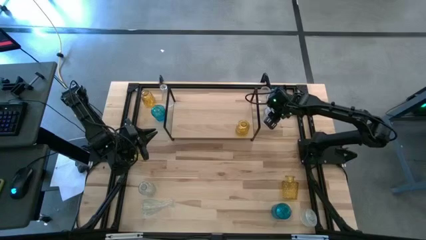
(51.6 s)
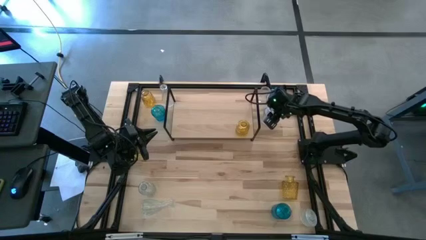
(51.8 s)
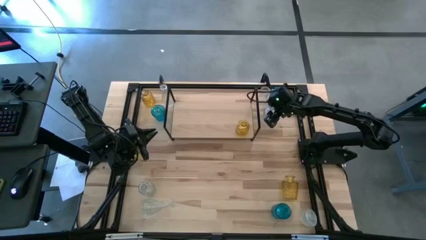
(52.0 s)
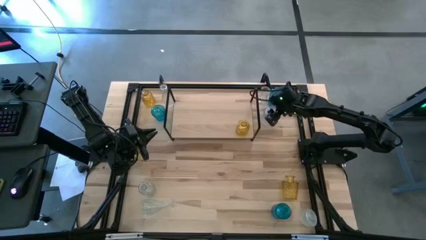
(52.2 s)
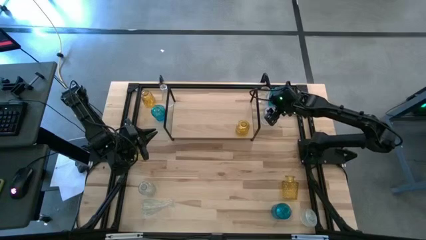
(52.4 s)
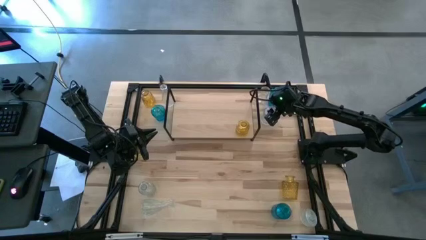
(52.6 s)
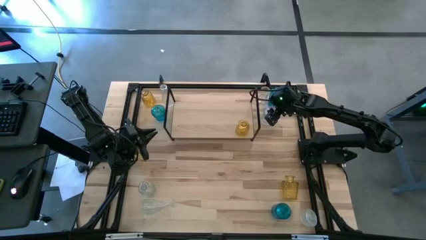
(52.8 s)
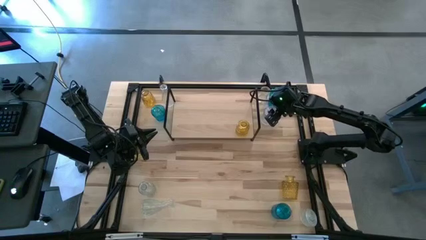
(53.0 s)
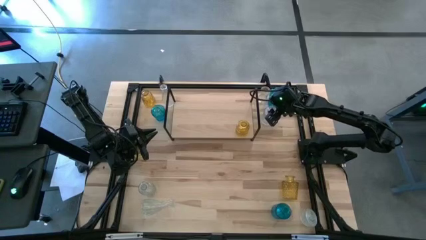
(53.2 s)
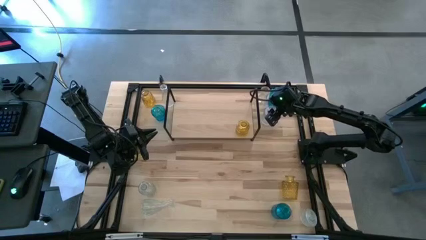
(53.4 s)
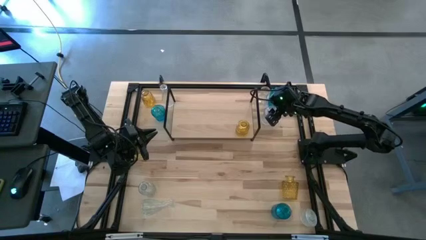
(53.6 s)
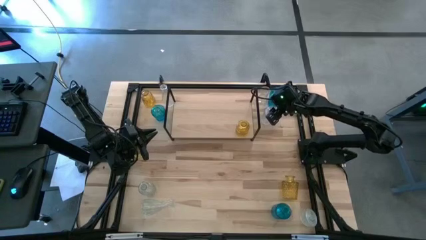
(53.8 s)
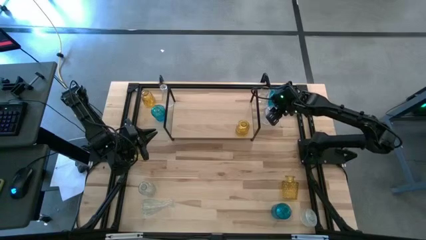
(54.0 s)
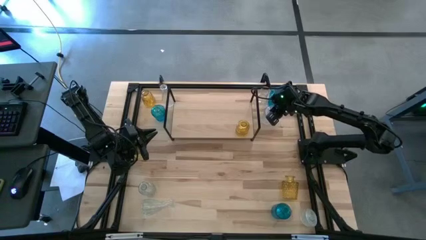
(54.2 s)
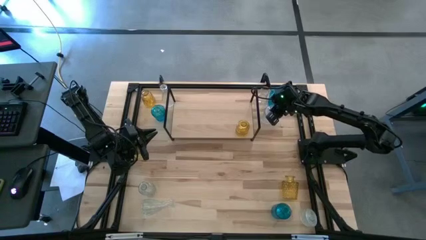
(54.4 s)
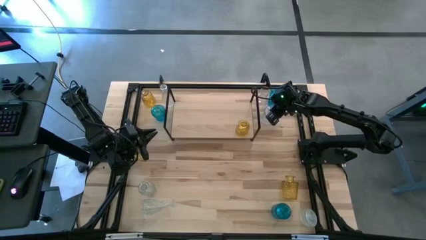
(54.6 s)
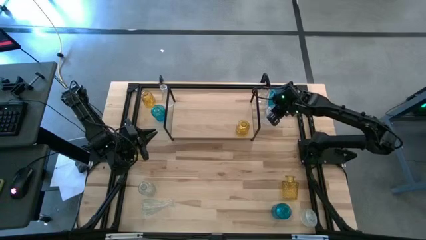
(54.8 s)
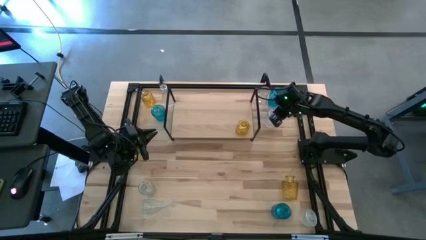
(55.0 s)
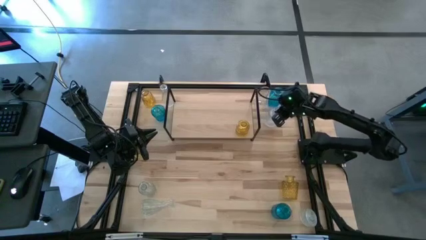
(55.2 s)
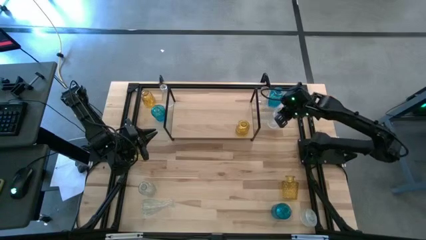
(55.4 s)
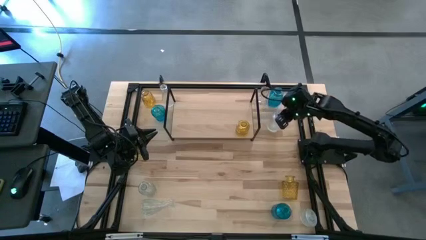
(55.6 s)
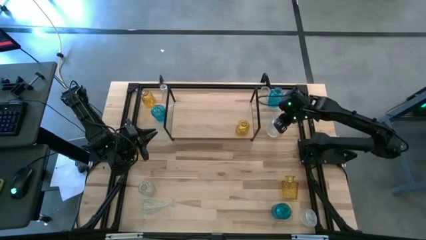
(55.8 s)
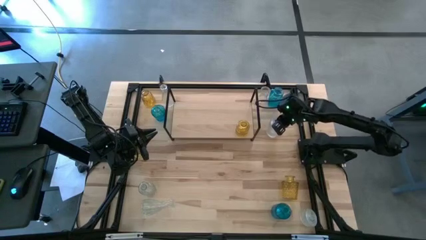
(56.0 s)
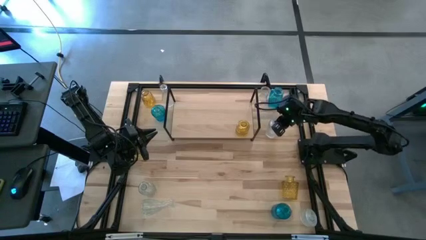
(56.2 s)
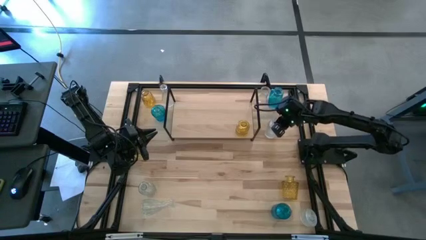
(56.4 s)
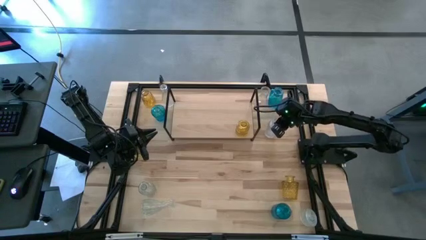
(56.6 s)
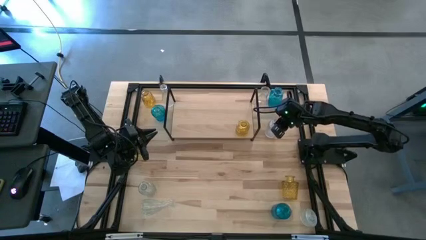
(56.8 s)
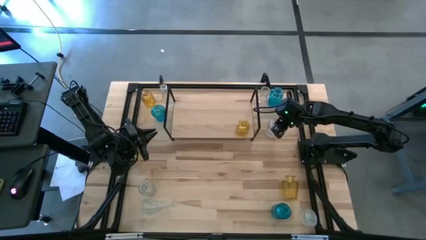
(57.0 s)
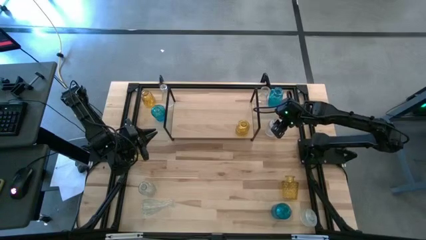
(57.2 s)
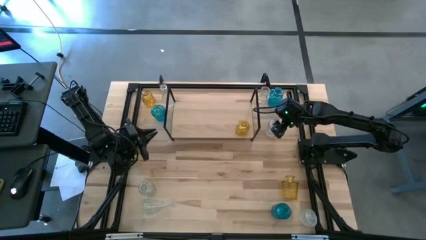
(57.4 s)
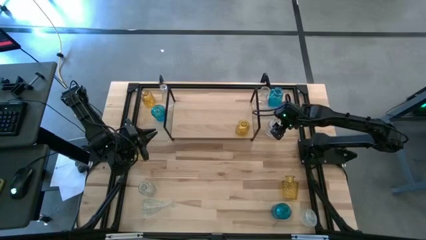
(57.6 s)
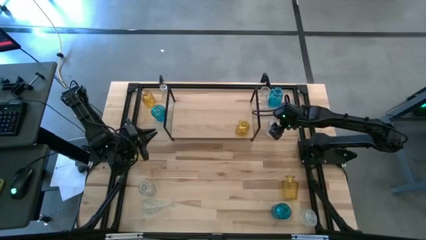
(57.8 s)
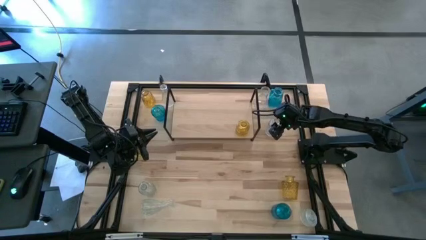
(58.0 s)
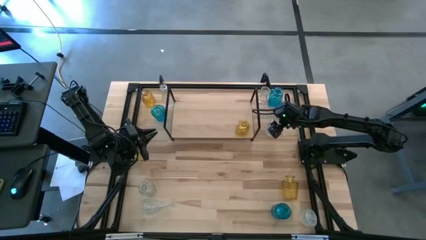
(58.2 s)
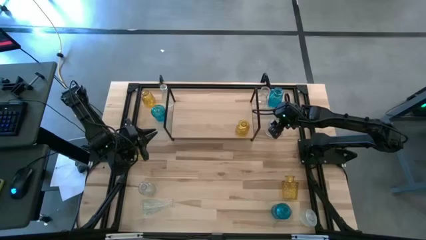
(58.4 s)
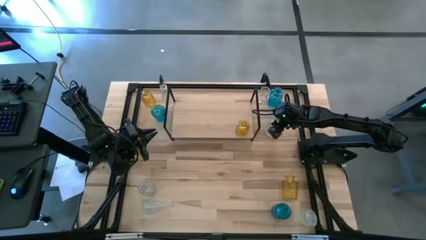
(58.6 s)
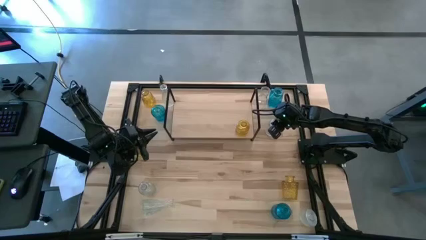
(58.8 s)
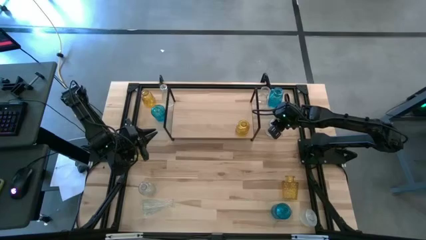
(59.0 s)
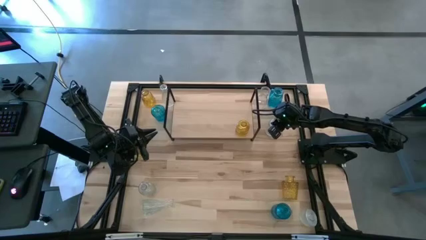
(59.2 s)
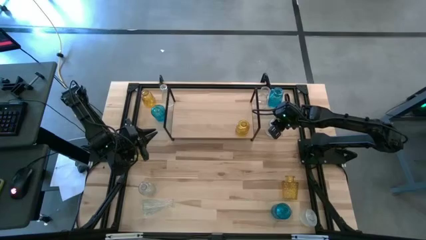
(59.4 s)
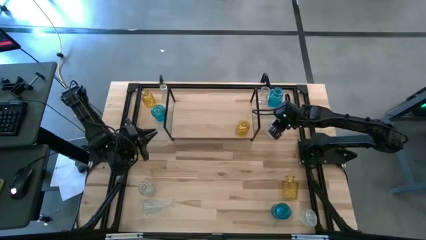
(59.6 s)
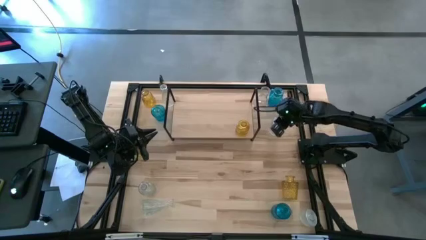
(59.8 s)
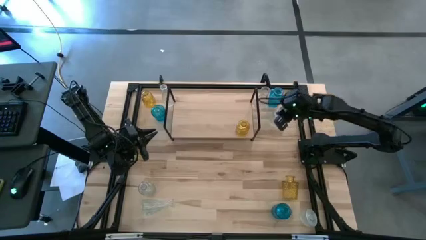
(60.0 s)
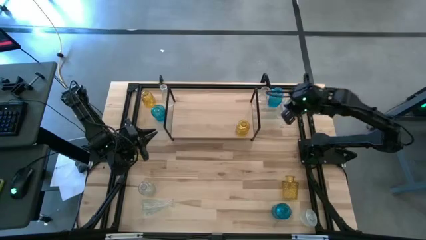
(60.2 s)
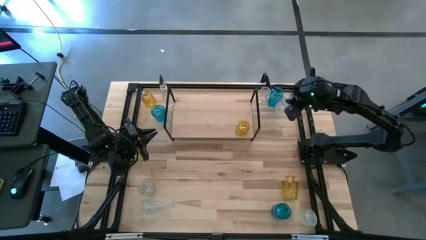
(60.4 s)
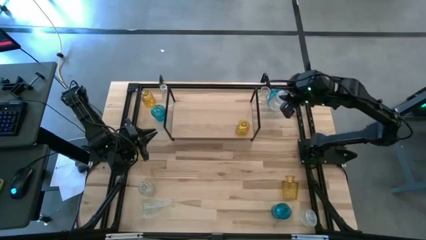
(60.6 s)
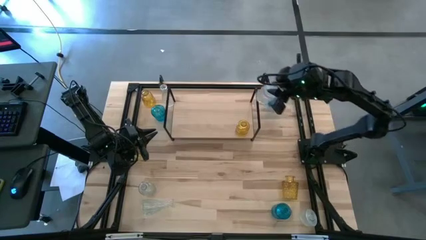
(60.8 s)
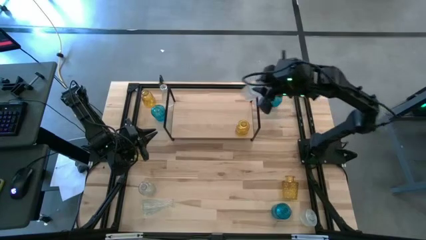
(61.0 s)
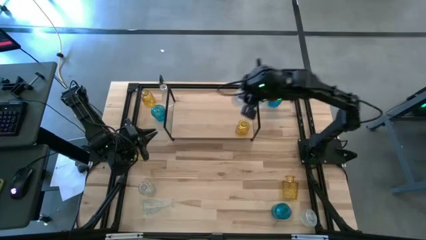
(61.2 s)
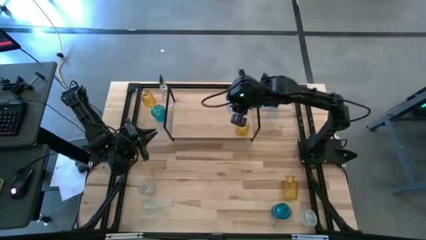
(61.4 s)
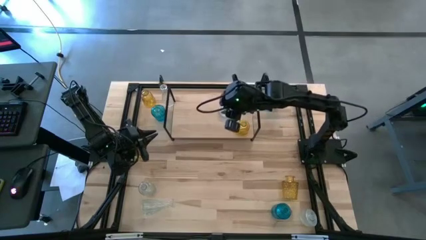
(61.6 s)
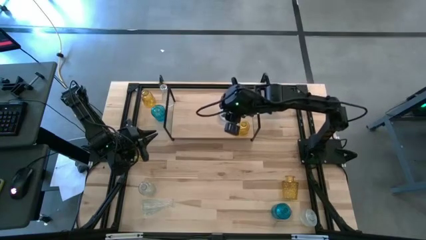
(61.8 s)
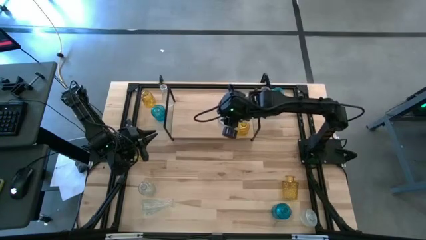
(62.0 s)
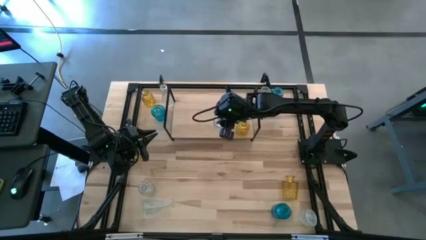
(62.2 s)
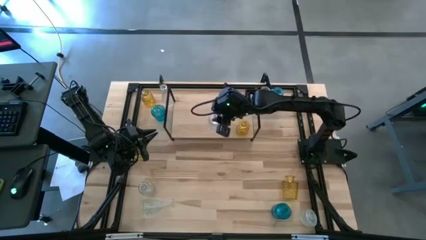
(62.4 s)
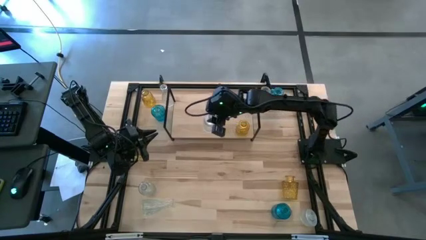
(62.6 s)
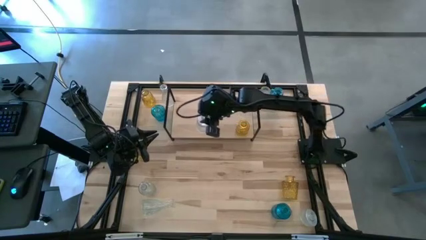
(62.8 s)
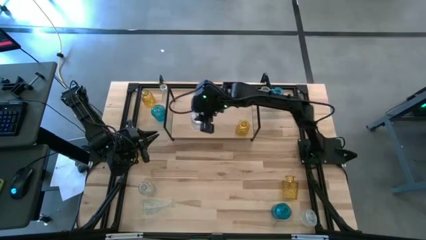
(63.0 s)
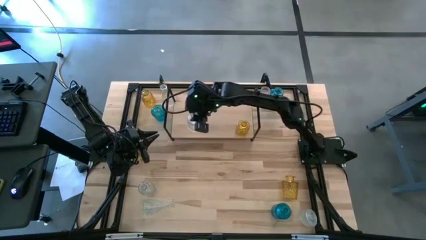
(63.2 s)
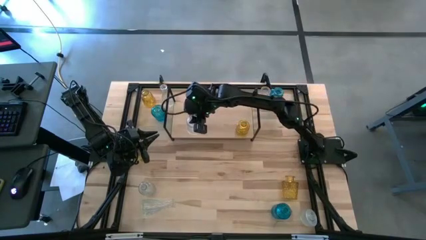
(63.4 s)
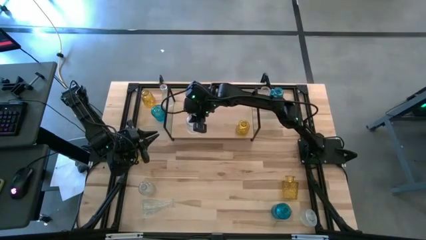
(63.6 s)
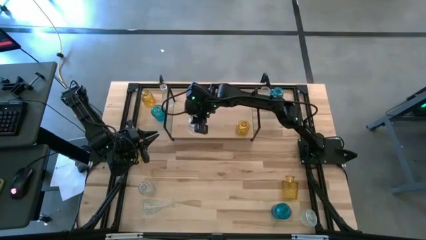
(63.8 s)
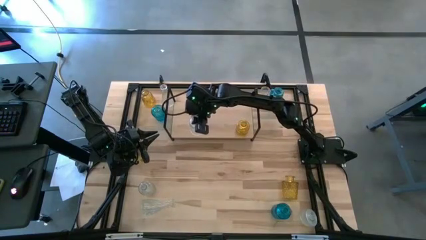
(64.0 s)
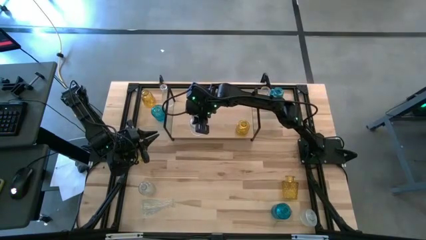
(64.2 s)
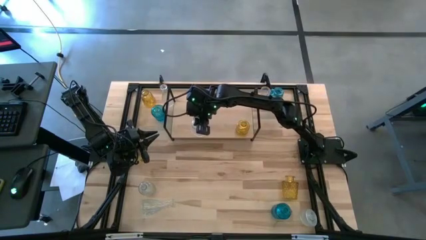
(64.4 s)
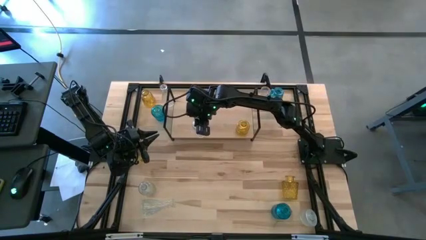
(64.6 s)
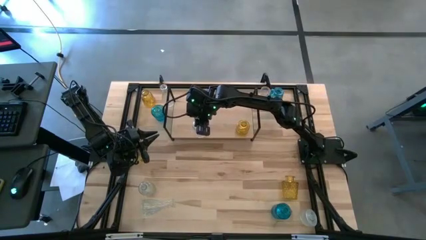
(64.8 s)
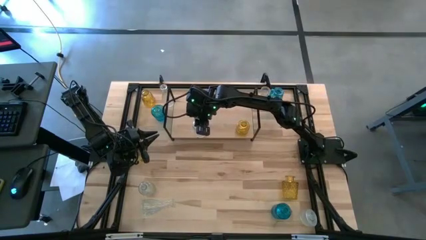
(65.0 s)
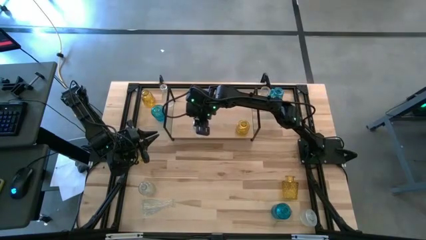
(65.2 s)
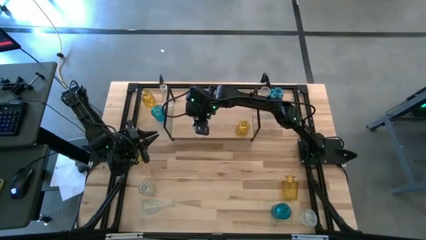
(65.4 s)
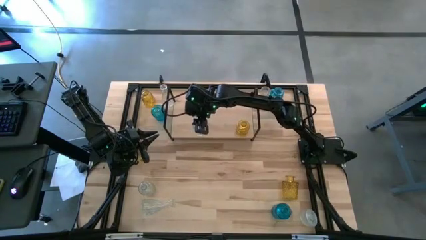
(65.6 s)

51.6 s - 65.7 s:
Task: sort vases onto shelf
Put the transparent vase on the shelf
